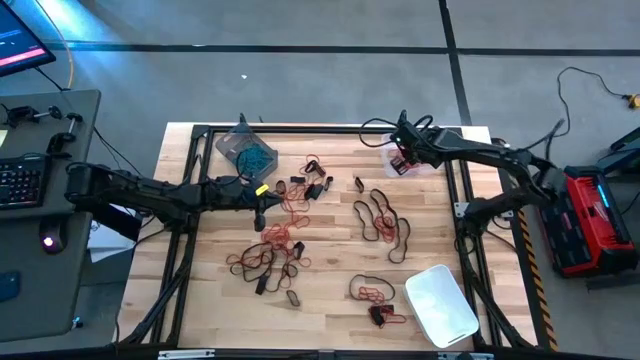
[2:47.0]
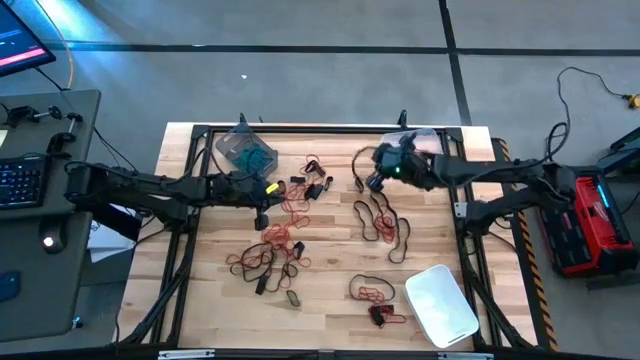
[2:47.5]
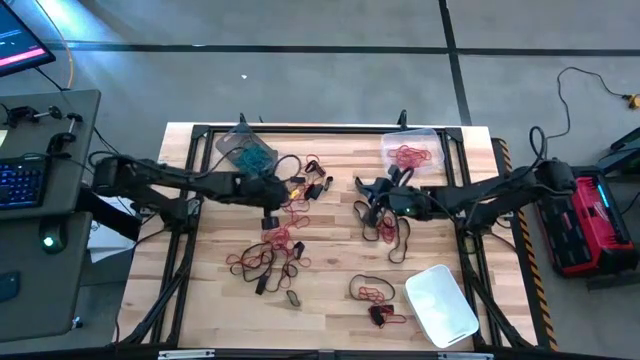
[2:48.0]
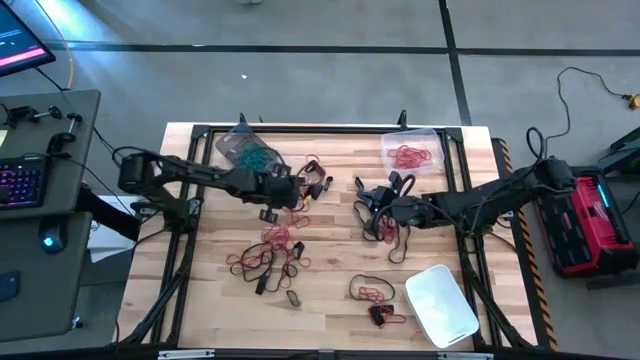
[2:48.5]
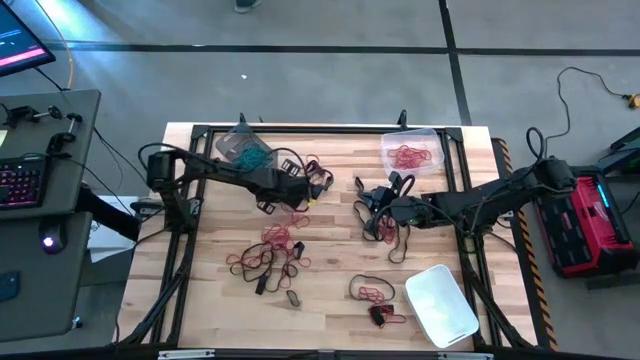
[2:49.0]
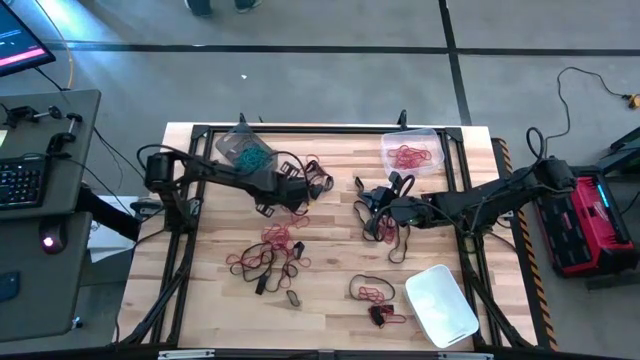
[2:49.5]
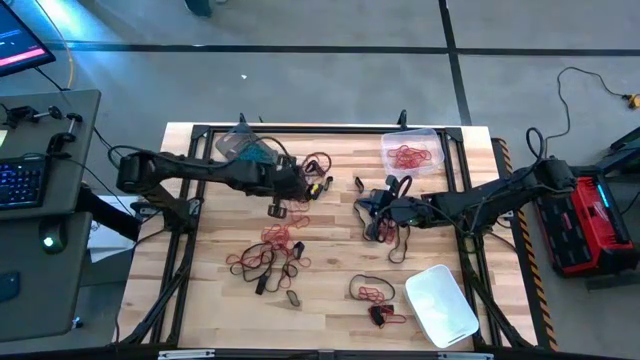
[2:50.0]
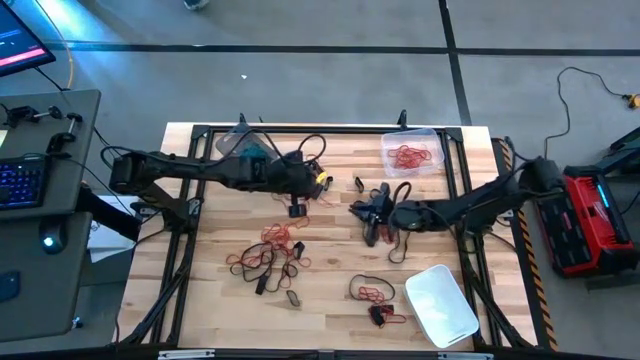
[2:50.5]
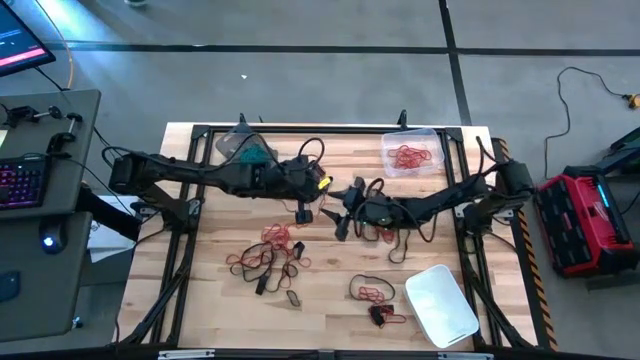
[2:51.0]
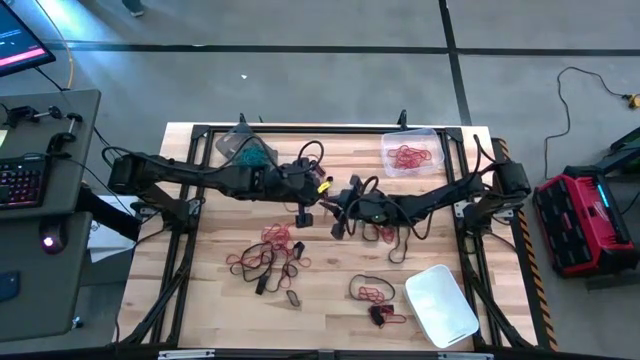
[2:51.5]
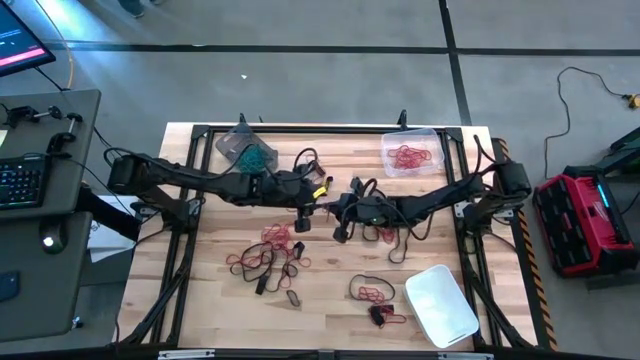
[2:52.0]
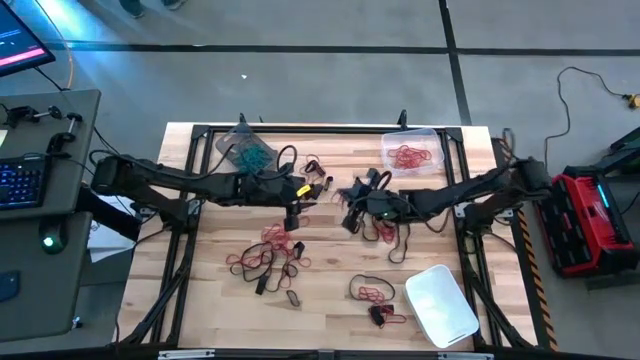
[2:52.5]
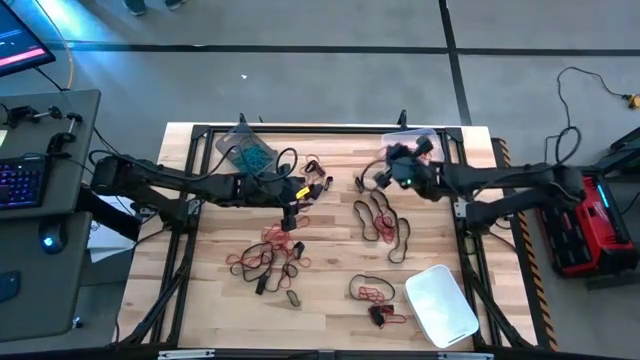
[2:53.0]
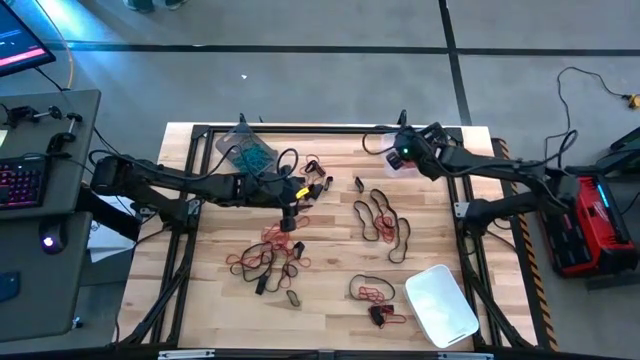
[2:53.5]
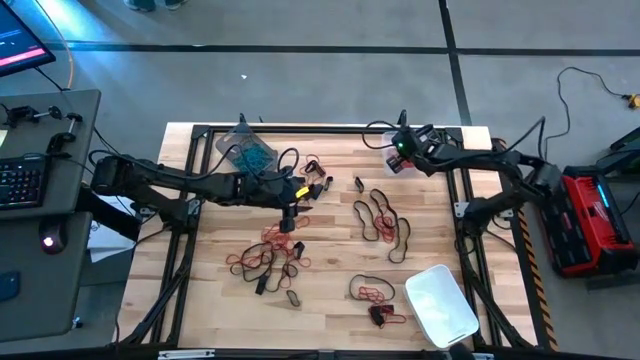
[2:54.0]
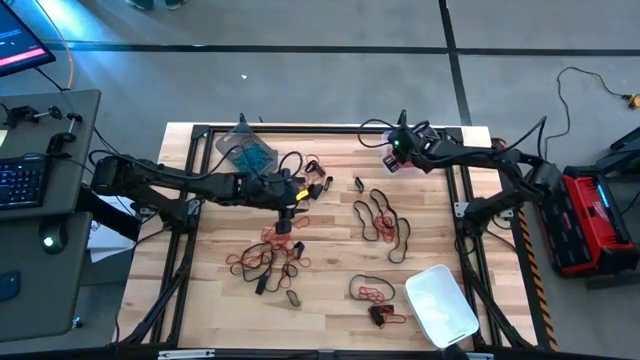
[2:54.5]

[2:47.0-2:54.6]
Task: Sort rubber bands into baskets
Put the red rubber band into the transparent bin

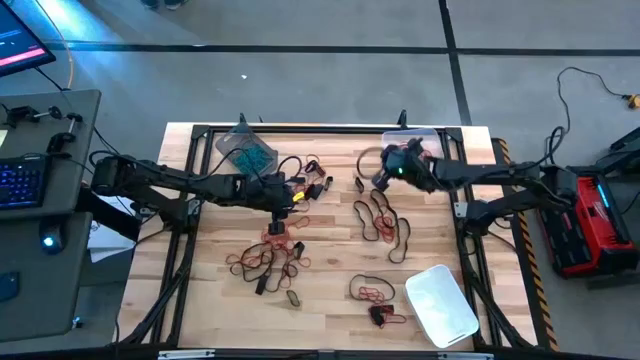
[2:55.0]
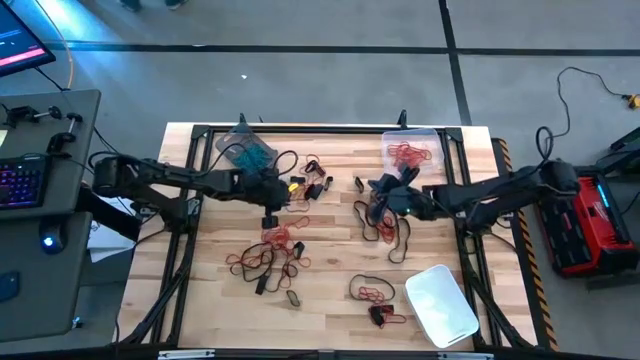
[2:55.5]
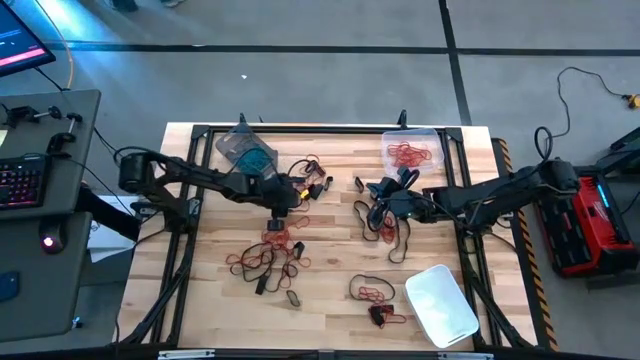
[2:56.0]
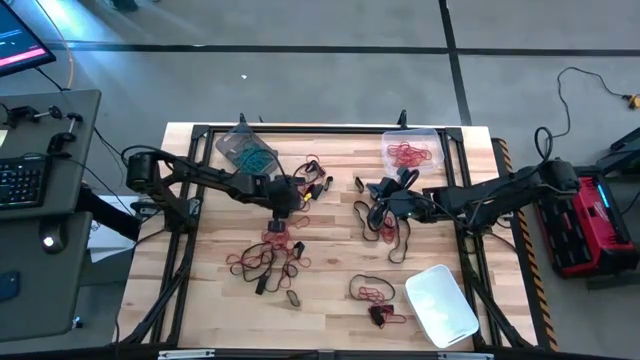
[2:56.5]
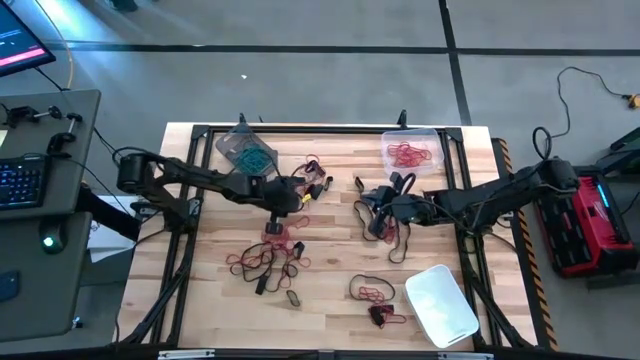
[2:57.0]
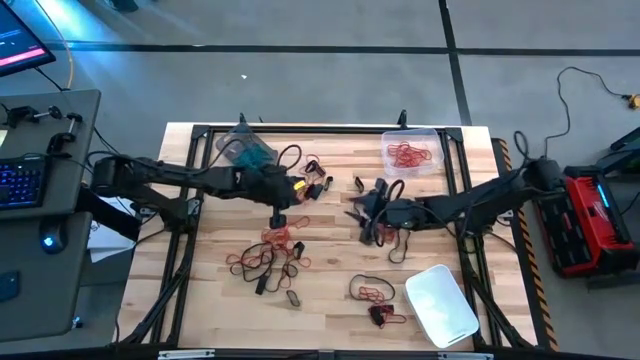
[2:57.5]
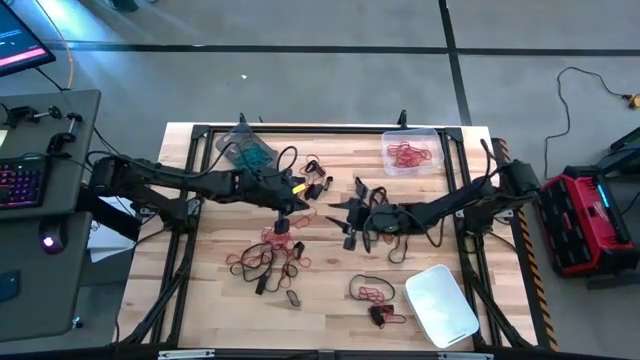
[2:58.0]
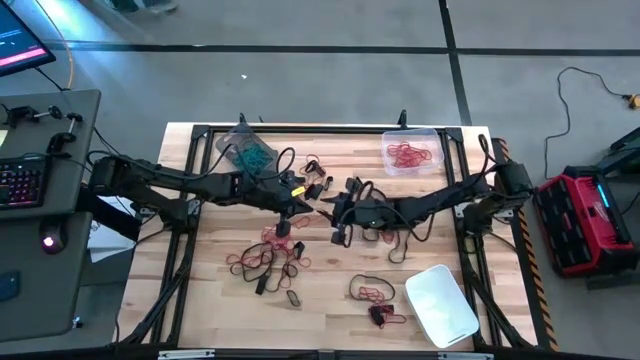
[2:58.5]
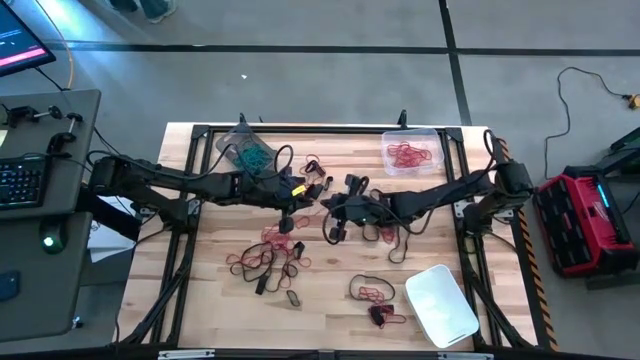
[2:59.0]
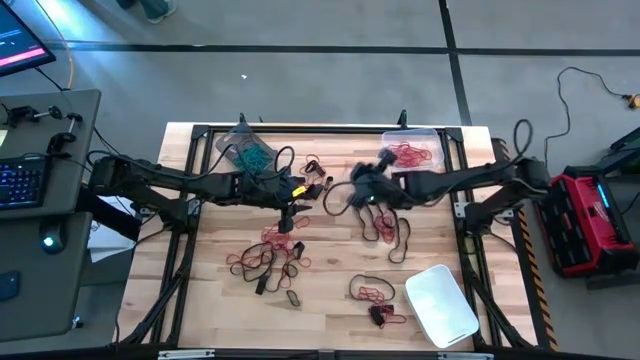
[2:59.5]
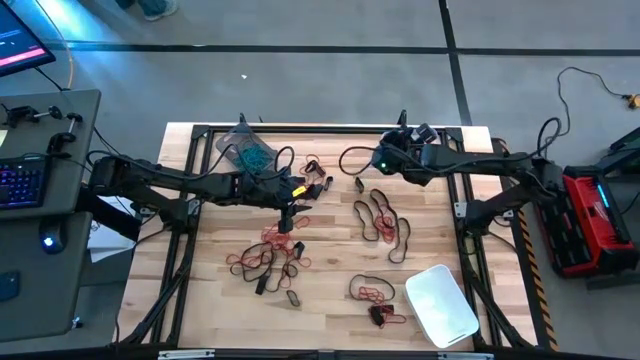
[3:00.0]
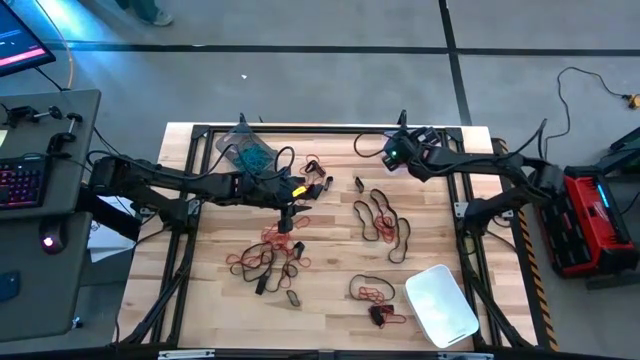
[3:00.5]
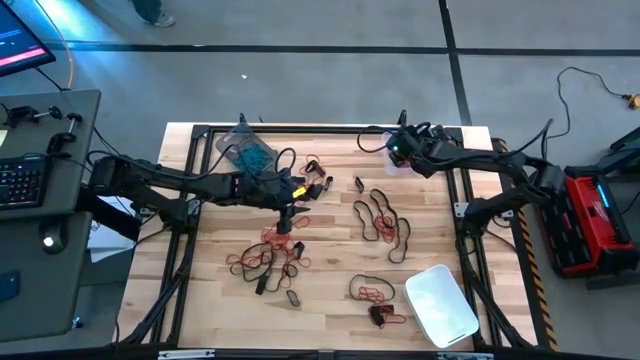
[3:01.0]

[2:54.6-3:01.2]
Put the red rubber band into the transparent bin

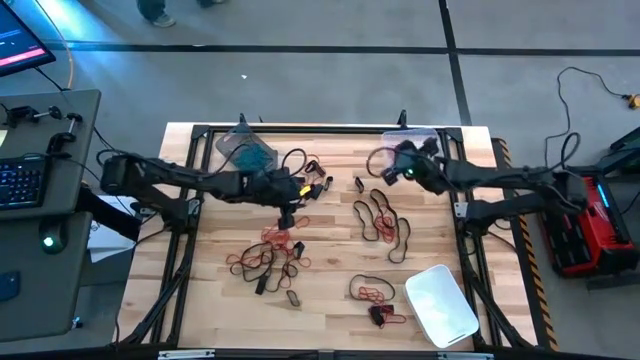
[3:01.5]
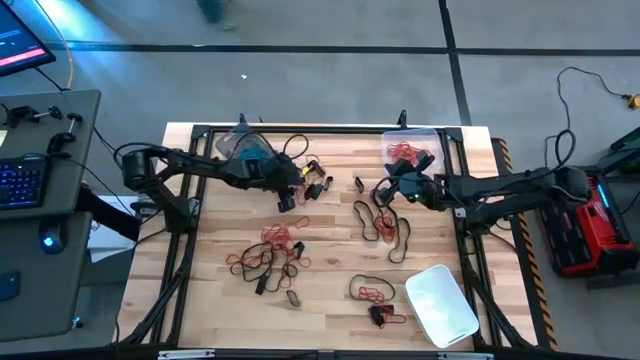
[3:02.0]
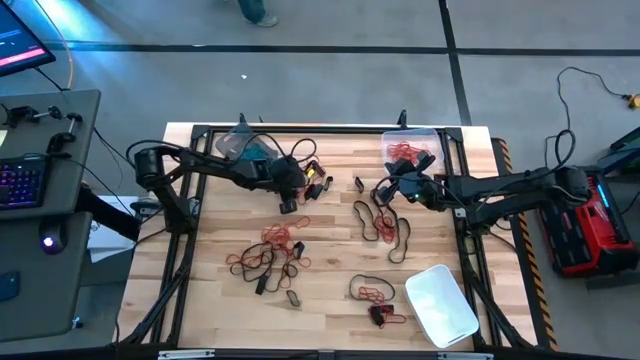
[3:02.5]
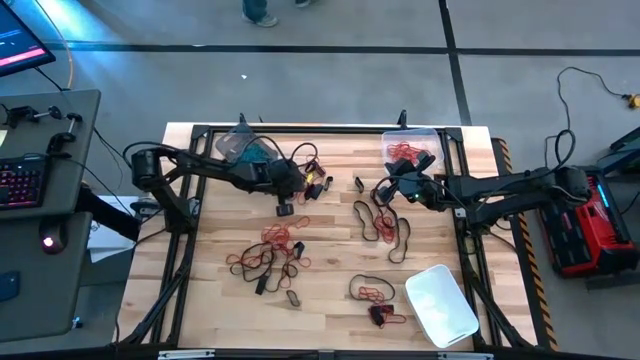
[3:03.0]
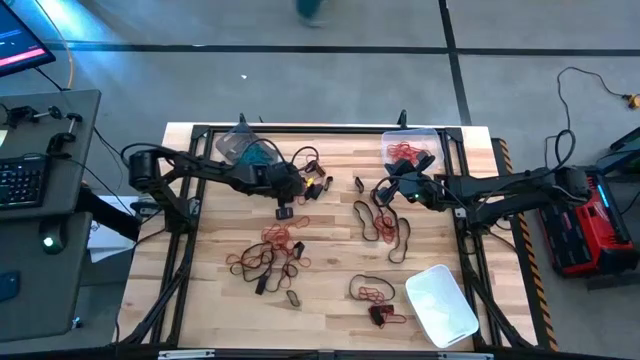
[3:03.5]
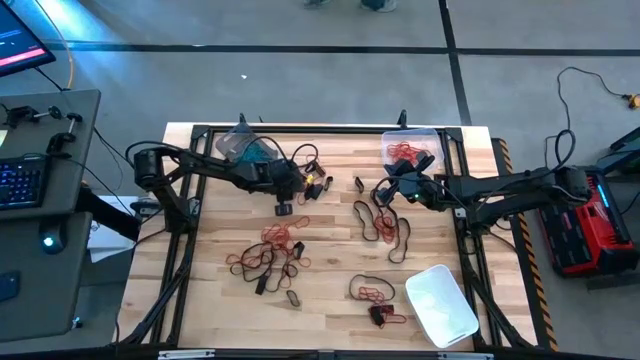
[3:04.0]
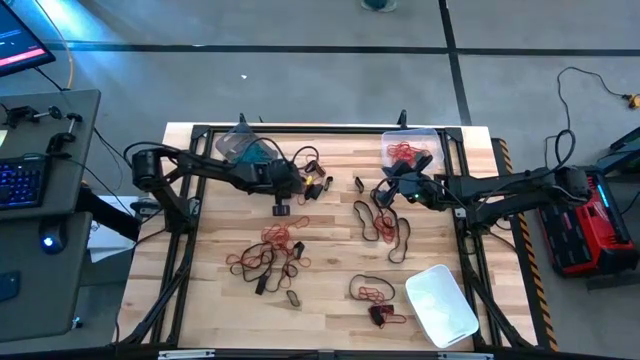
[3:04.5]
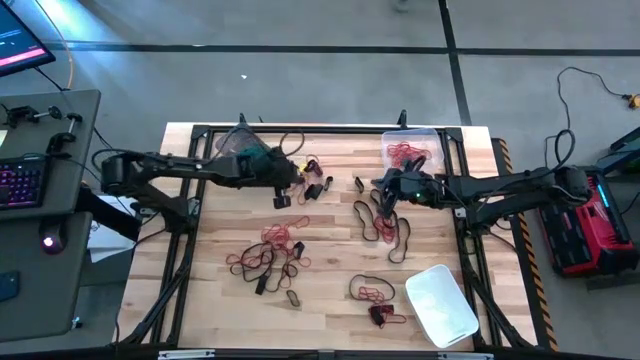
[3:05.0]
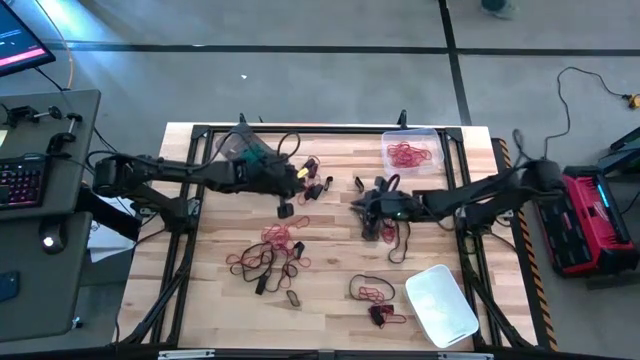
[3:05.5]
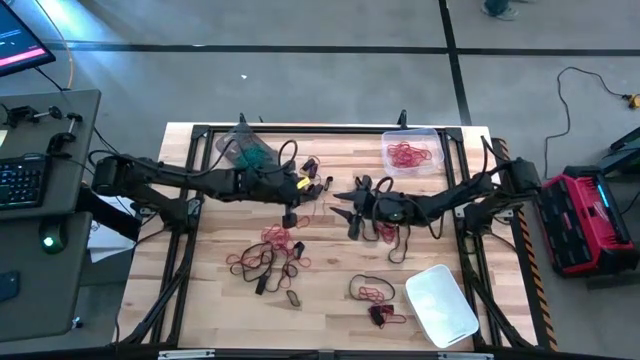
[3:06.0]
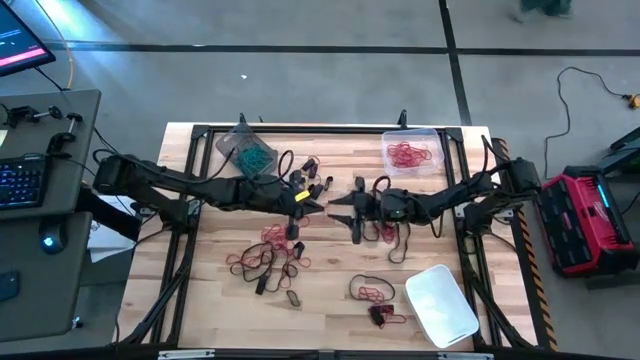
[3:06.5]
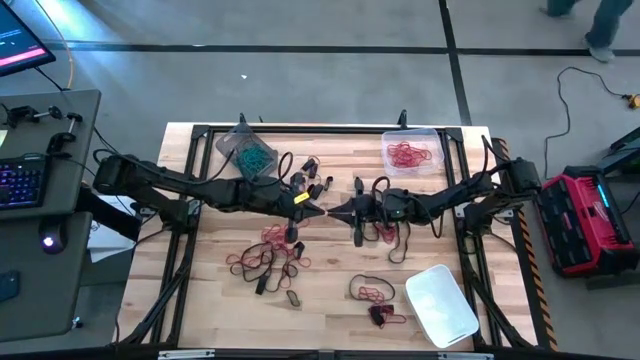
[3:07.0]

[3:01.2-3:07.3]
Put the red rubber band into the transparent bin

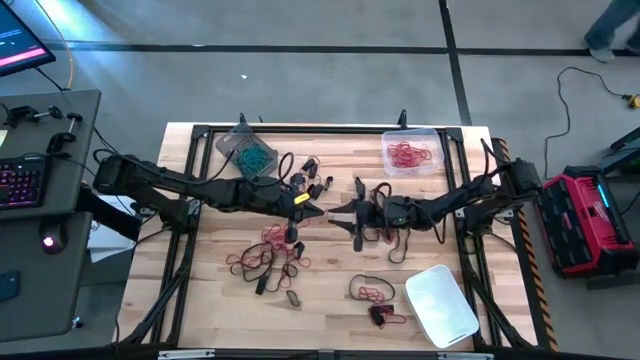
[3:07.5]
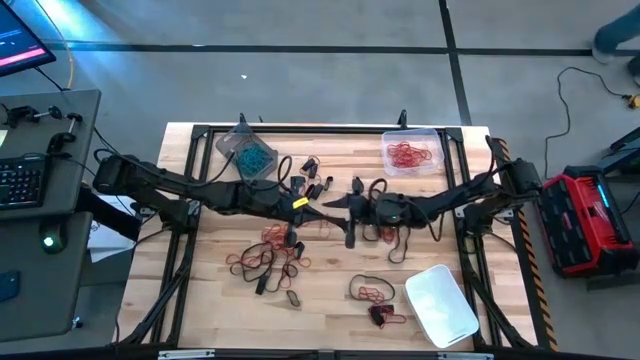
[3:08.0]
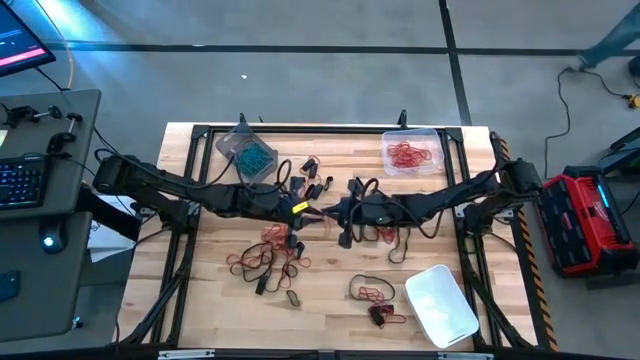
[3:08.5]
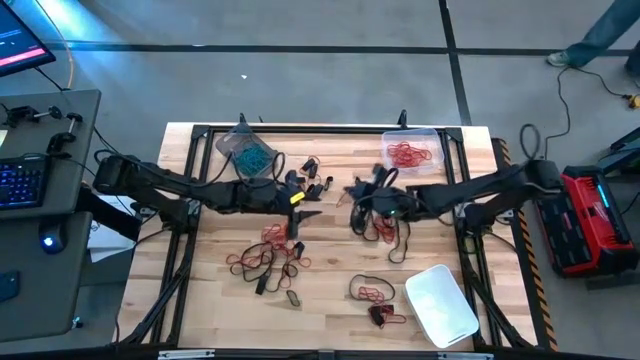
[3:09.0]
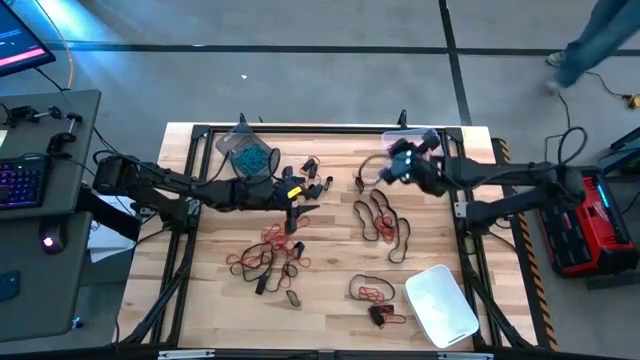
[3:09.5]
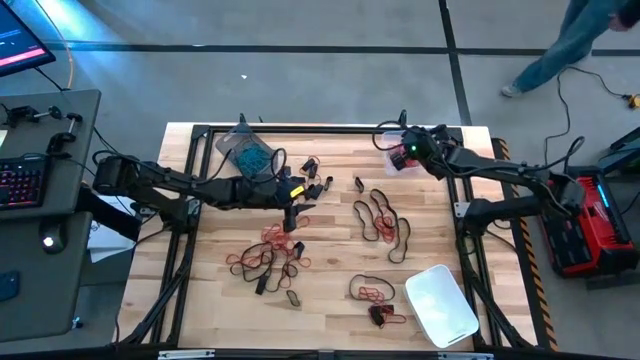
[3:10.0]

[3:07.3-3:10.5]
Put the red rubber band into the transparent bin
